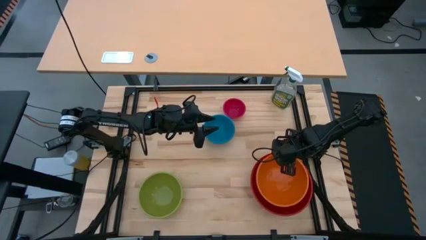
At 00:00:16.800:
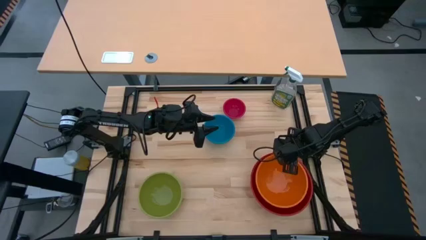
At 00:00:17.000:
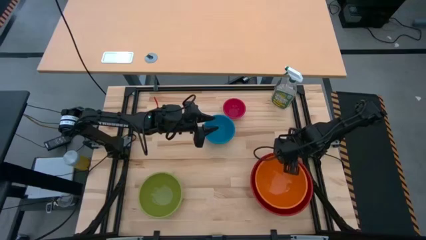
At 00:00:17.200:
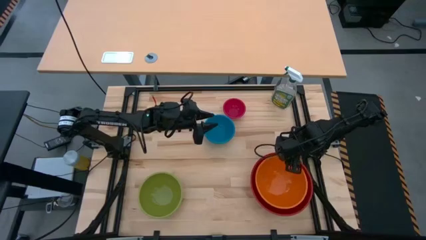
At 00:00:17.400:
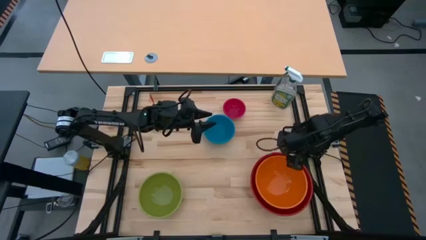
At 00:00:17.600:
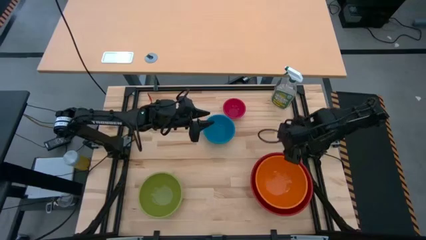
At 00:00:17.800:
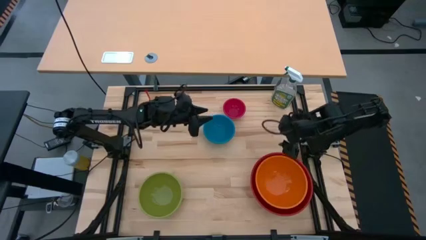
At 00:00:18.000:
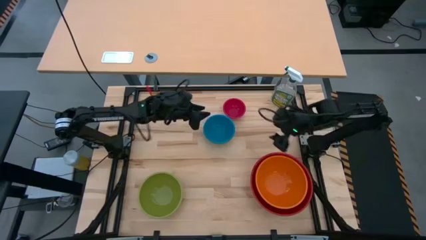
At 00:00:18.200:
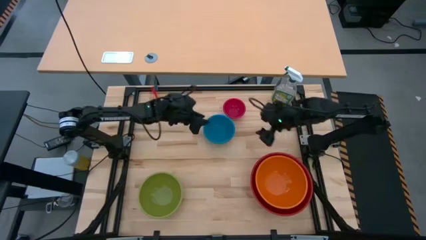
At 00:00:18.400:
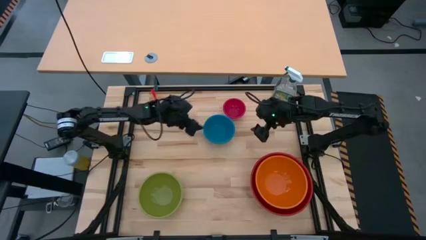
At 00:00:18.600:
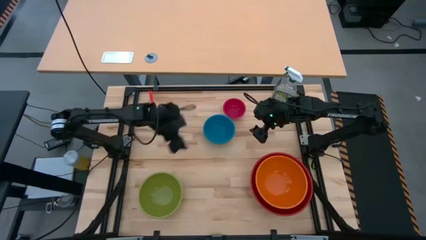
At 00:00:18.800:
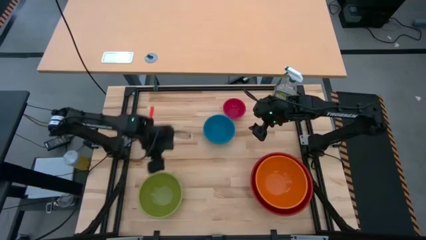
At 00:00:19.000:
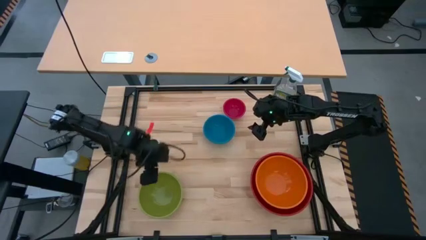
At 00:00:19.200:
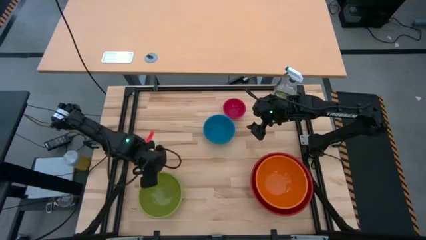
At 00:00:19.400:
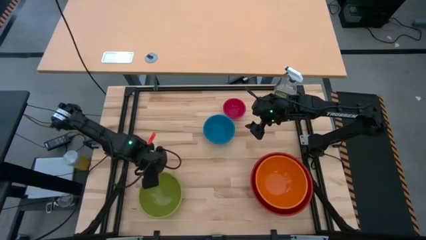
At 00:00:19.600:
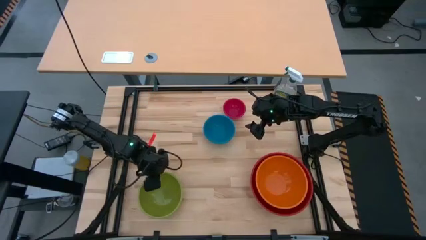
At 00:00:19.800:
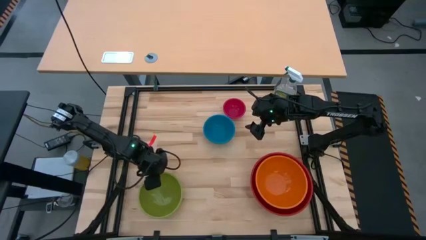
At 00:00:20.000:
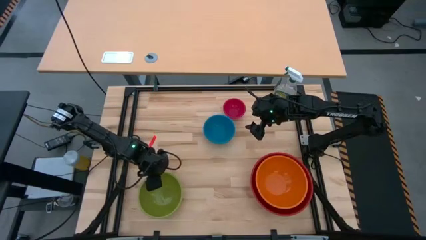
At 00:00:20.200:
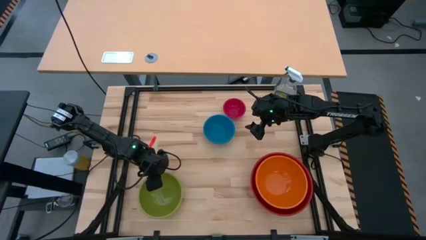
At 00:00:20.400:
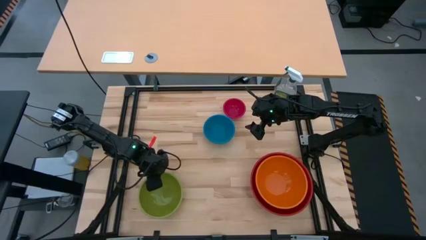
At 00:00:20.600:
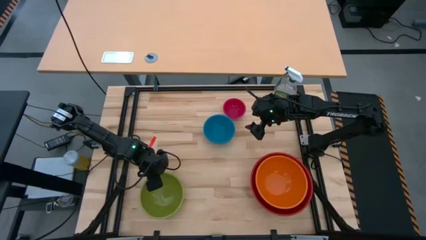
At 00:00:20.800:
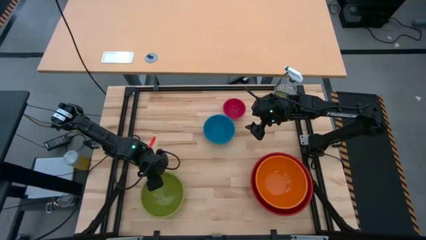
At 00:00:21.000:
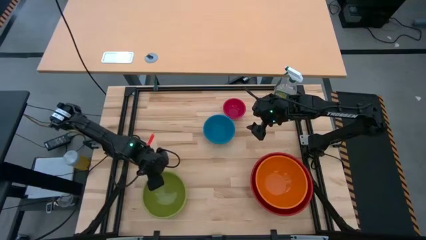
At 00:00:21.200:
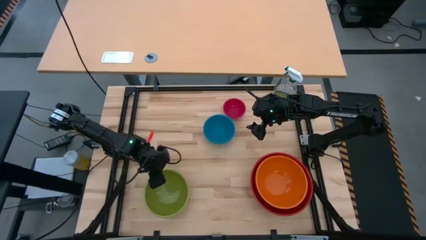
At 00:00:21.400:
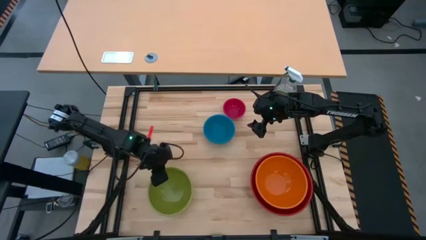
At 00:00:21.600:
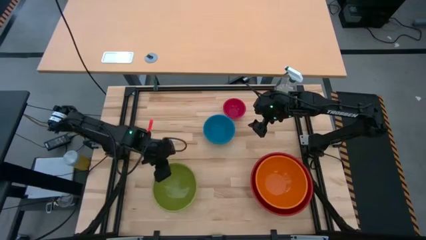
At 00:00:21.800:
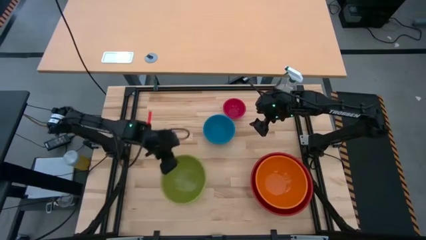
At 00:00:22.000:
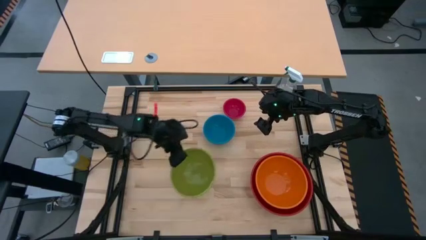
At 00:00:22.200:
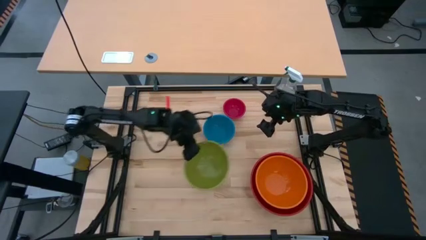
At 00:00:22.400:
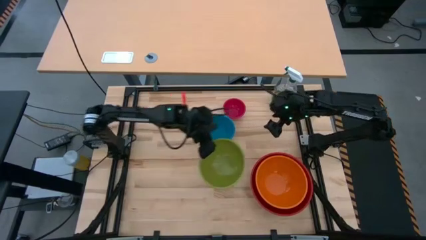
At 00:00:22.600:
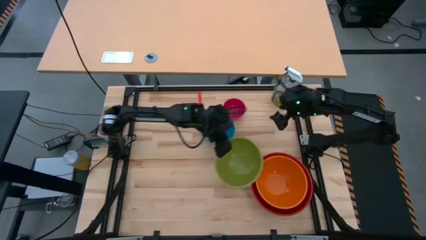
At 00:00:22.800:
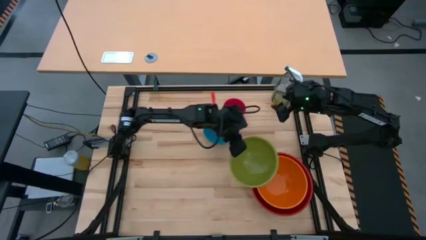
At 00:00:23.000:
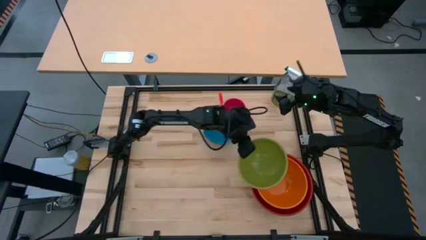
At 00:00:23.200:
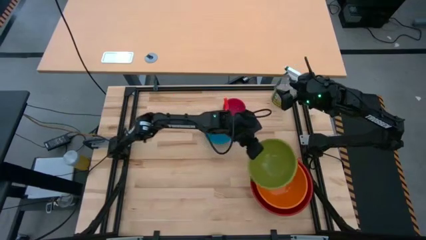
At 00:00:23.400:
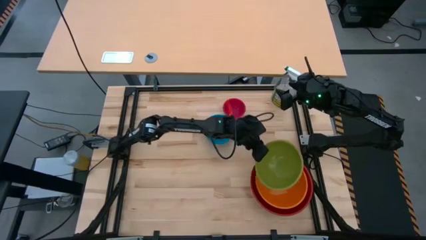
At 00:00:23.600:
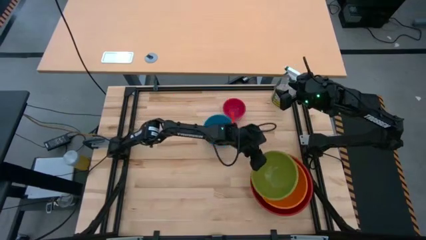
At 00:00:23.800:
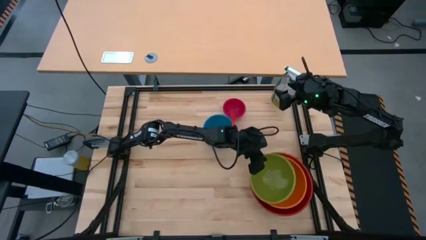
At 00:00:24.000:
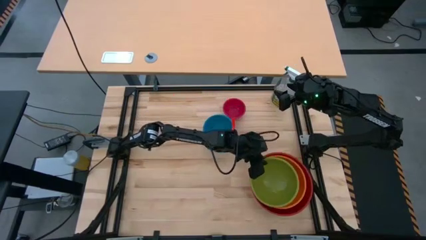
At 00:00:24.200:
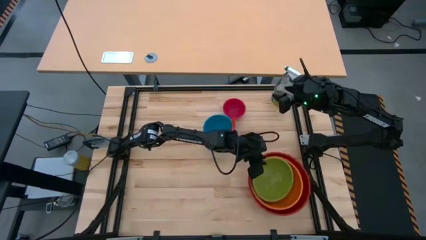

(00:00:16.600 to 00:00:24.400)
Stack the green bowl on top of the orange bowl

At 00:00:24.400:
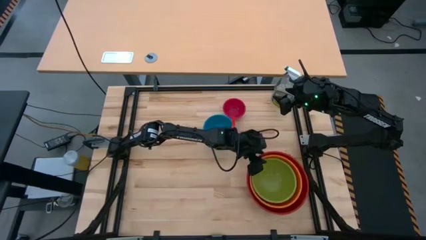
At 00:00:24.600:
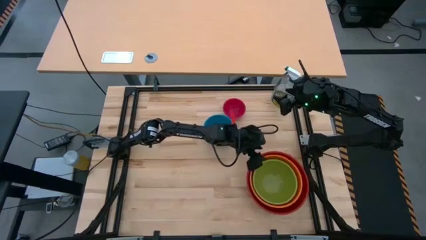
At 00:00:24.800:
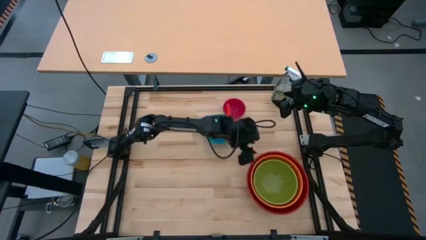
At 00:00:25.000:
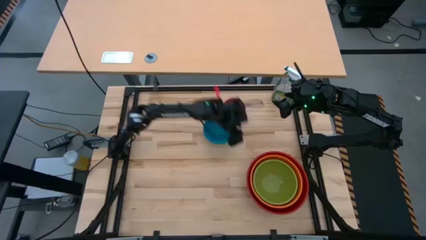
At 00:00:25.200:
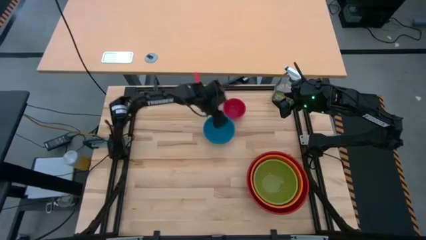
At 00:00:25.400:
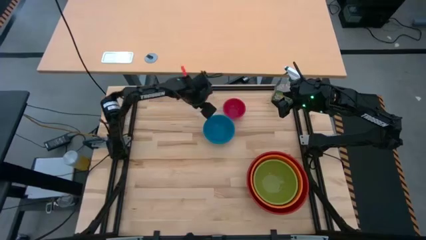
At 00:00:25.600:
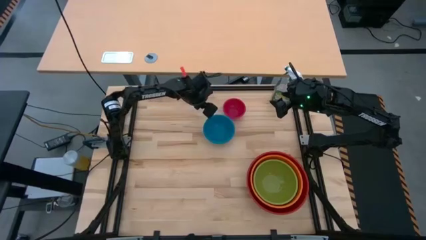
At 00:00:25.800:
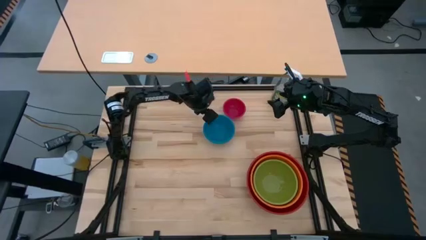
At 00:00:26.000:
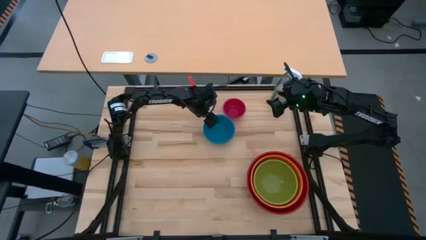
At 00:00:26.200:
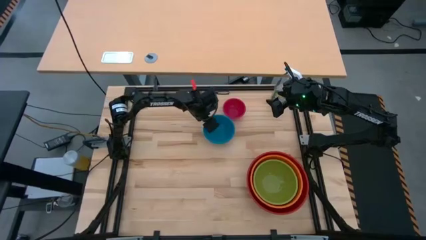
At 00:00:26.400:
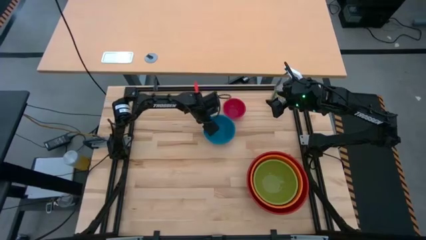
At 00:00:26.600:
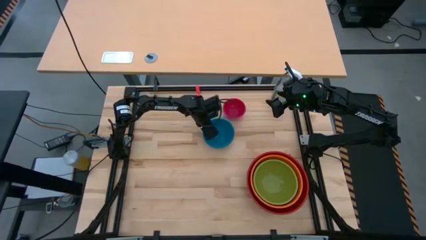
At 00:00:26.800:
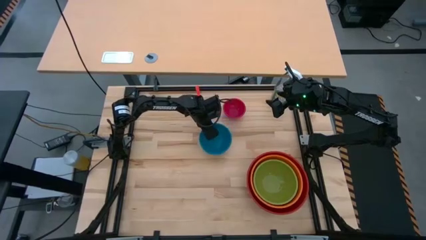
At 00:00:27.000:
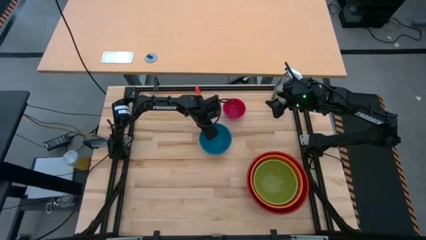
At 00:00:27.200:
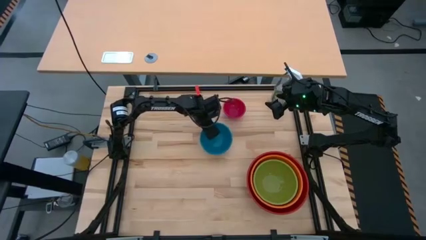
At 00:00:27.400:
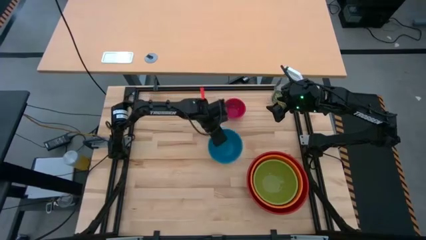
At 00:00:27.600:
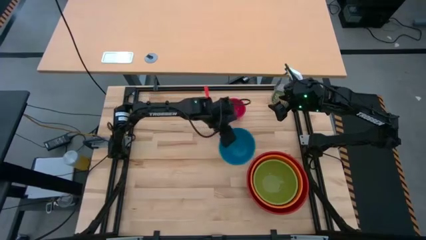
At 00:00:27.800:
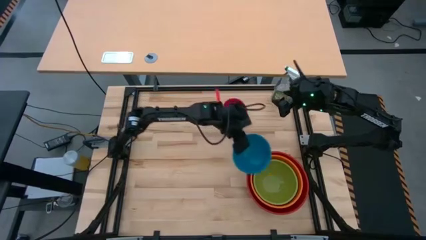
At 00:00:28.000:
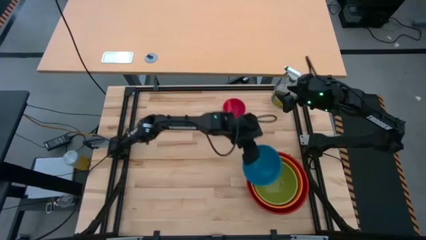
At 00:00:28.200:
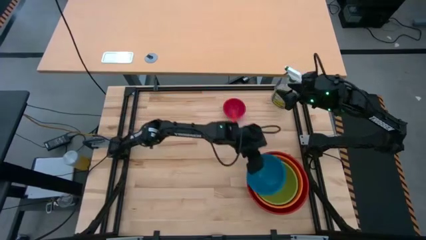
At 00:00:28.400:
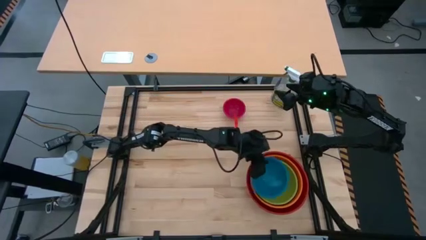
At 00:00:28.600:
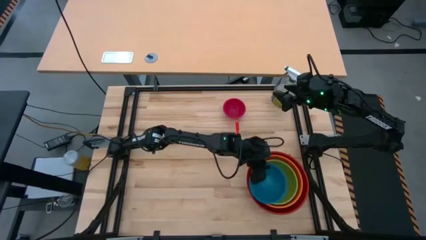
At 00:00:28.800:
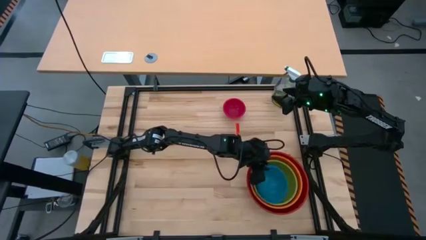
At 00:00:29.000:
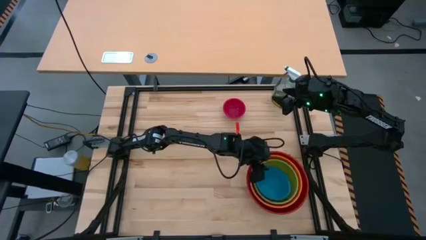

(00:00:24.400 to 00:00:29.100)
Stack the blue bowl on top of the green bowl

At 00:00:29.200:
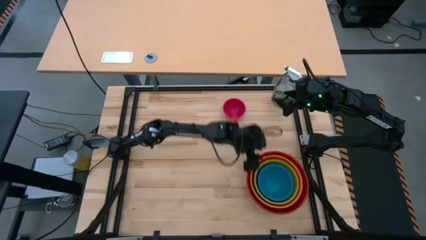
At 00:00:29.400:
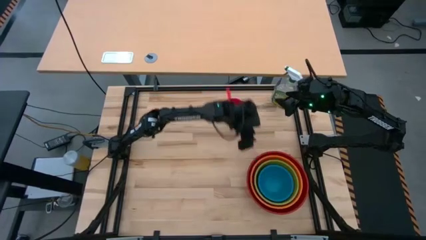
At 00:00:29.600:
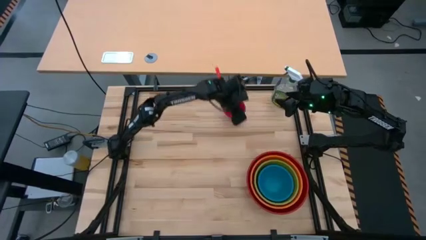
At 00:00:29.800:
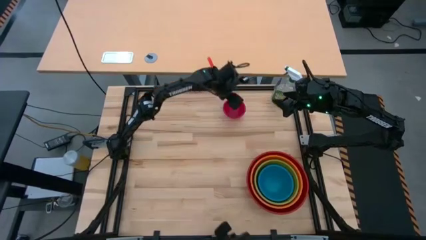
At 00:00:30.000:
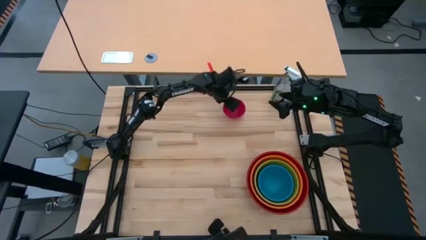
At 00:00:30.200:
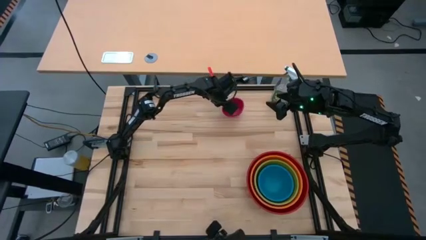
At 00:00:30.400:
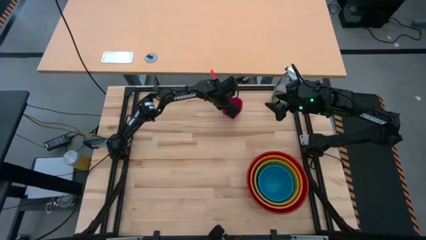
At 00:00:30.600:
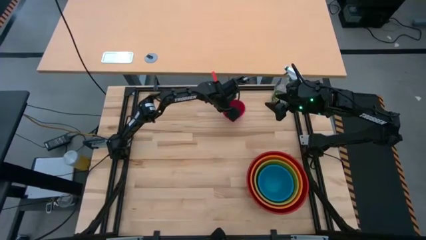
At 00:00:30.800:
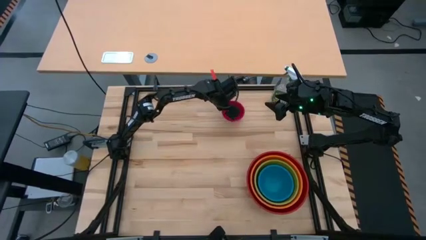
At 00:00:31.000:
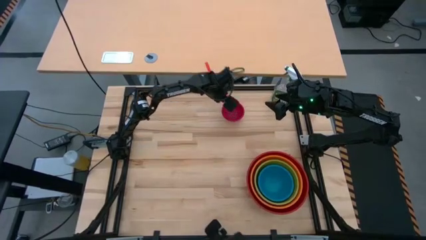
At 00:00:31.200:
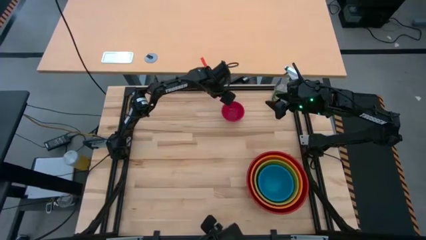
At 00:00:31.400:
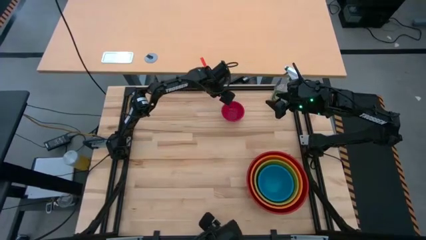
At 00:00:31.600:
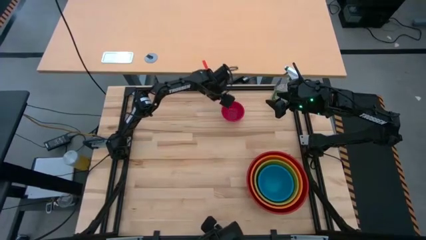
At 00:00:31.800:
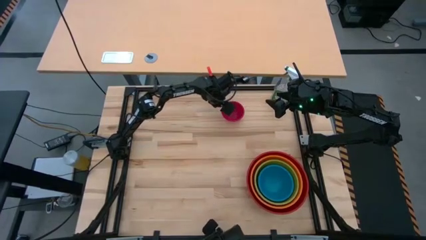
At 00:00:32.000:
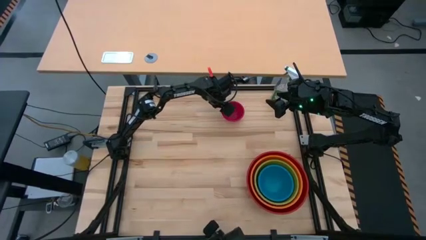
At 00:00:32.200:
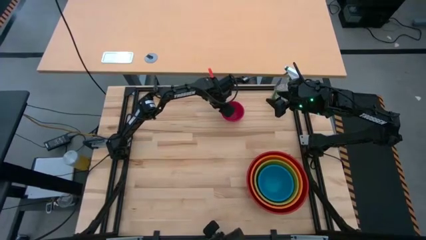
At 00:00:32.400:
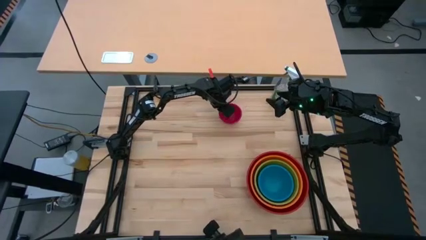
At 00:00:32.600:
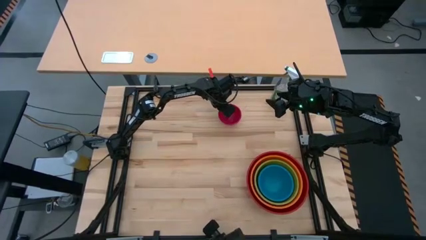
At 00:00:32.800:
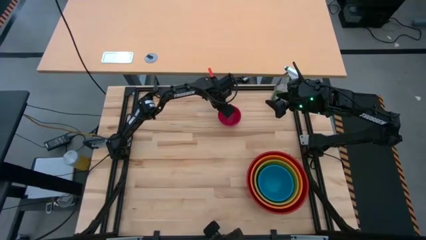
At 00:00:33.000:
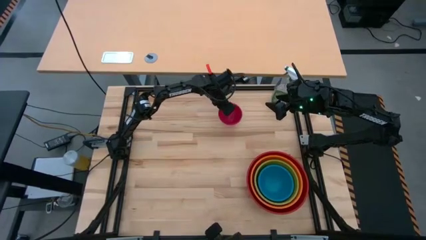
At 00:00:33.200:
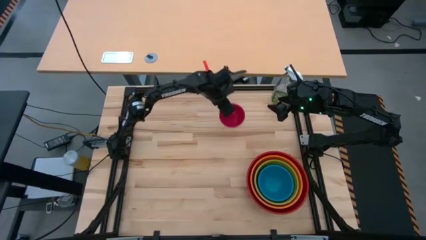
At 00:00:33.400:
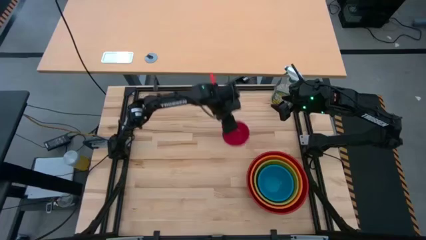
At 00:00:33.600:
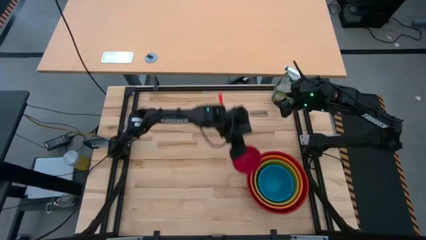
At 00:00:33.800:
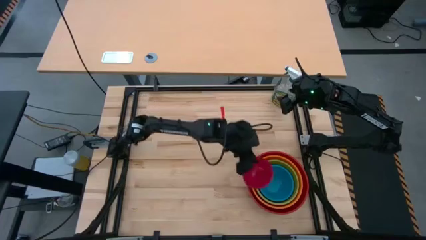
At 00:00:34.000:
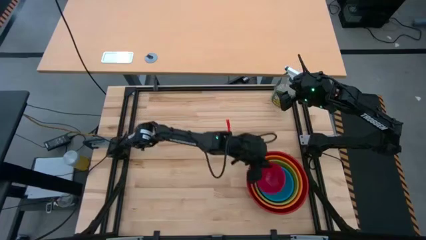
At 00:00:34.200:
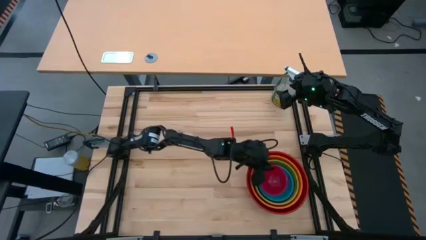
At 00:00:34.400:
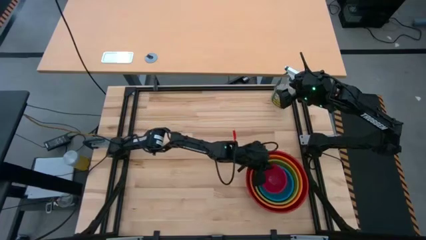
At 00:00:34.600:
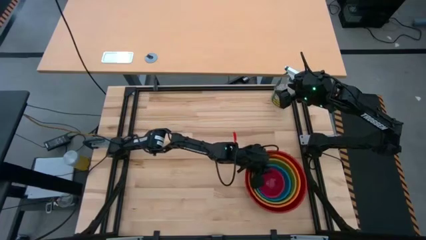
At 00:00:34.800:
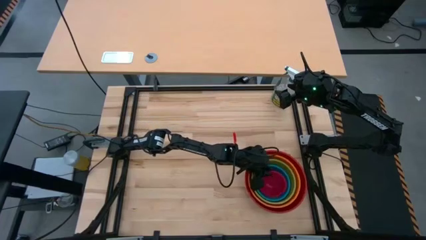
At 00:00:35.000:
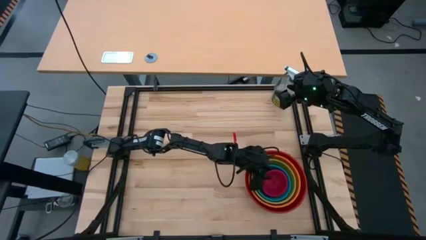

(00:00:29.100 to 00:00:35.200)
Stack the pink bowl on top of the blue bowl
